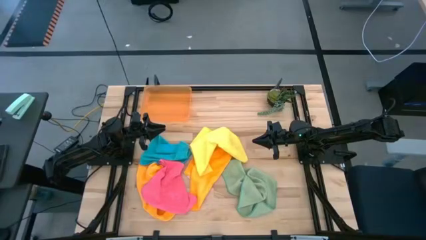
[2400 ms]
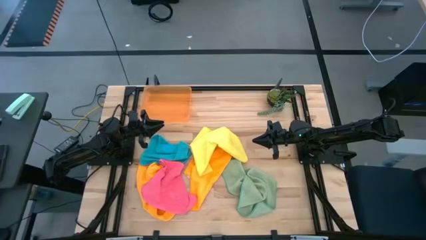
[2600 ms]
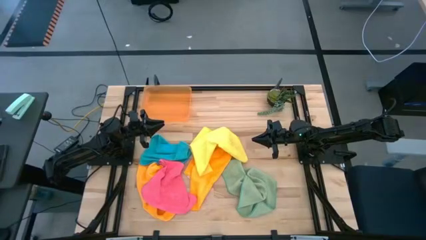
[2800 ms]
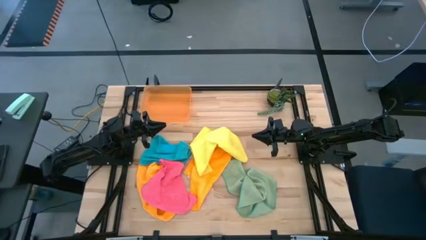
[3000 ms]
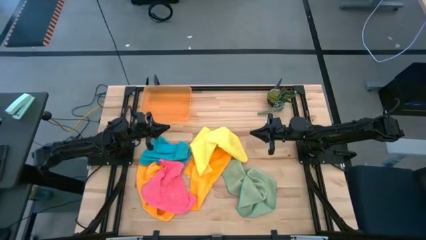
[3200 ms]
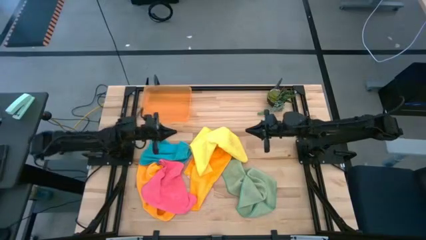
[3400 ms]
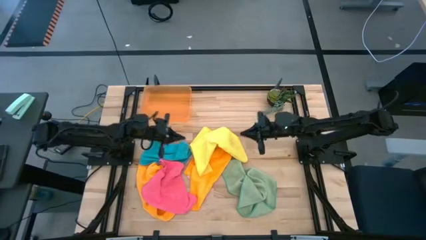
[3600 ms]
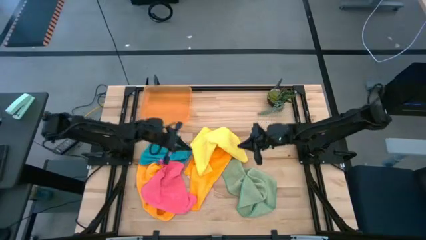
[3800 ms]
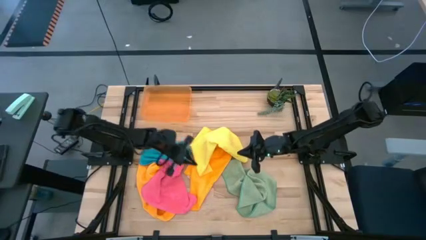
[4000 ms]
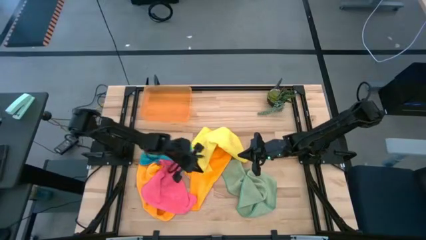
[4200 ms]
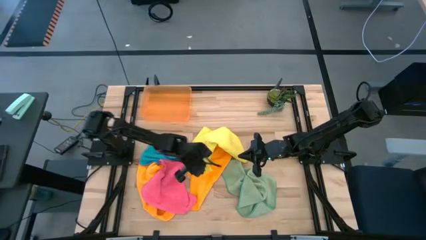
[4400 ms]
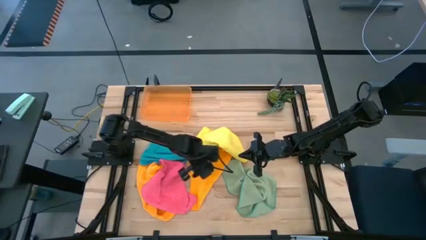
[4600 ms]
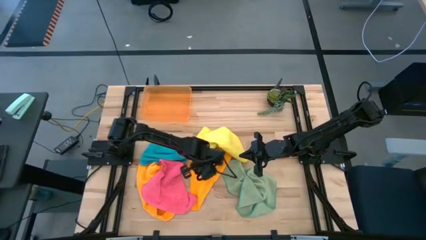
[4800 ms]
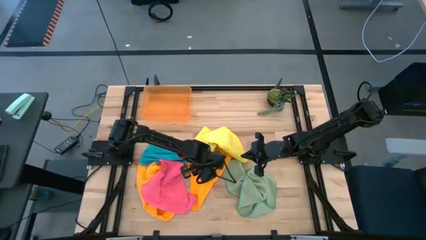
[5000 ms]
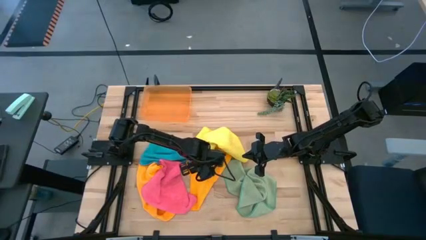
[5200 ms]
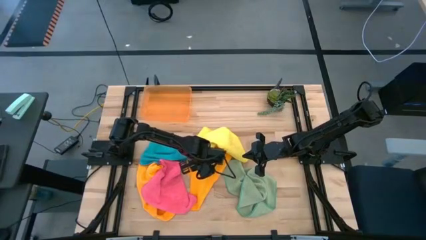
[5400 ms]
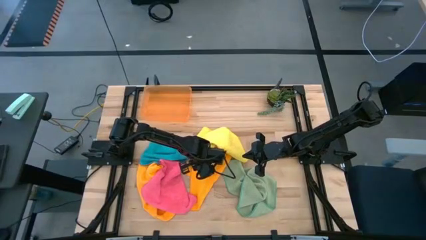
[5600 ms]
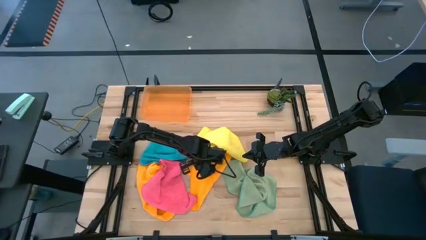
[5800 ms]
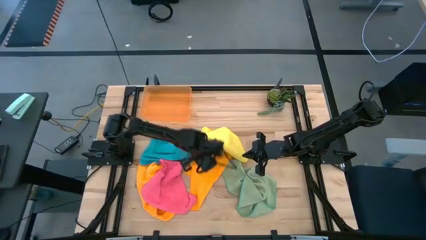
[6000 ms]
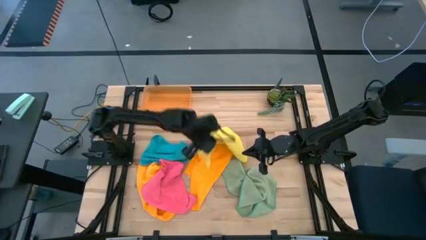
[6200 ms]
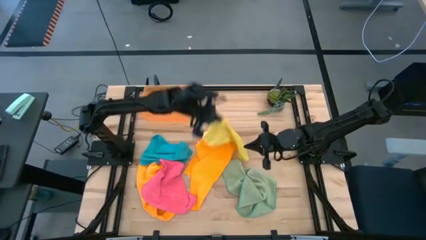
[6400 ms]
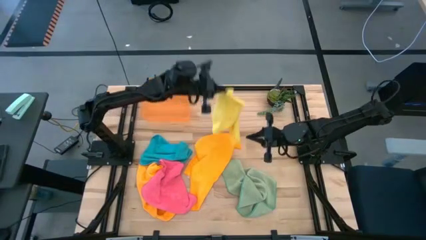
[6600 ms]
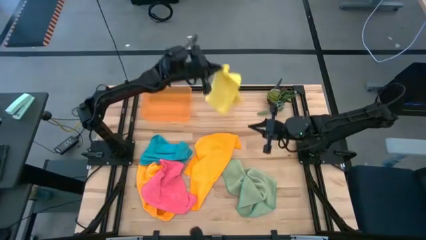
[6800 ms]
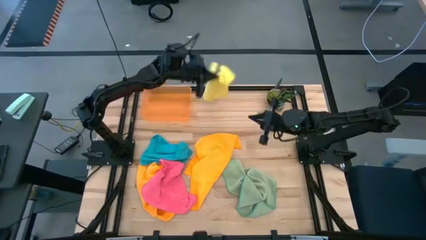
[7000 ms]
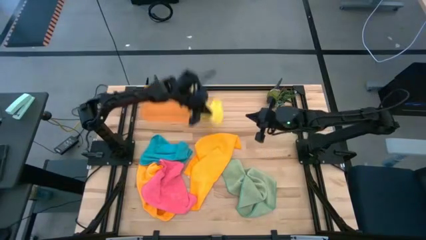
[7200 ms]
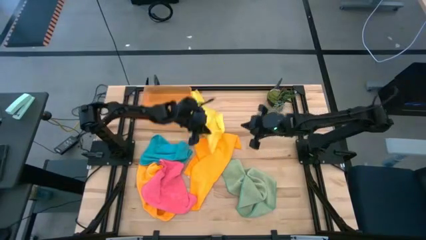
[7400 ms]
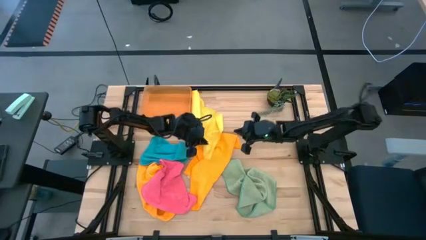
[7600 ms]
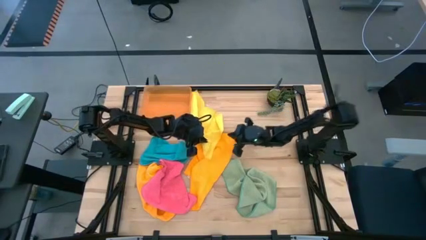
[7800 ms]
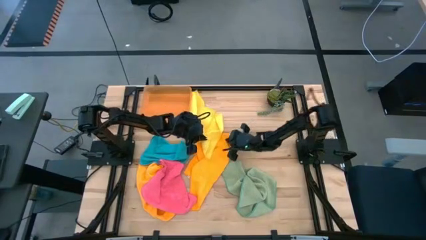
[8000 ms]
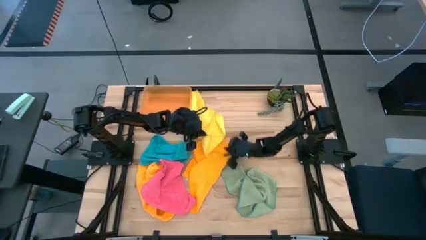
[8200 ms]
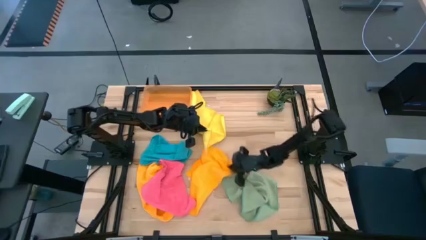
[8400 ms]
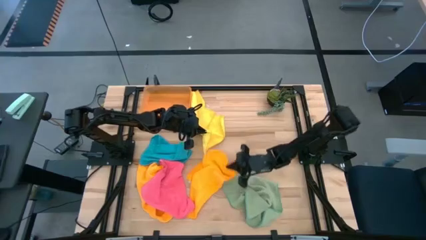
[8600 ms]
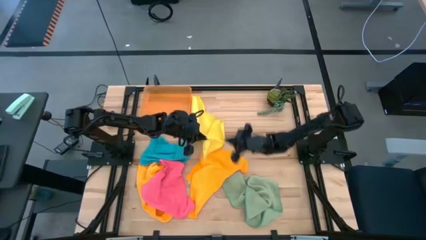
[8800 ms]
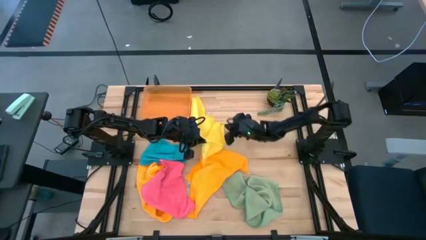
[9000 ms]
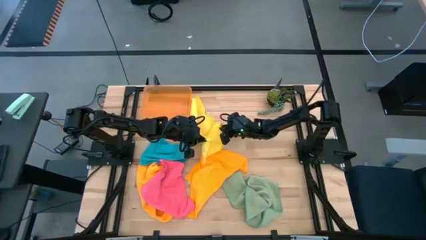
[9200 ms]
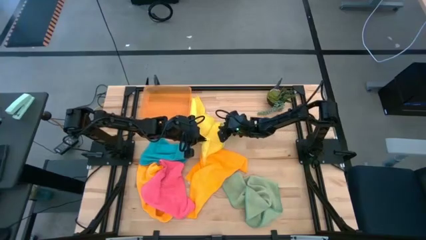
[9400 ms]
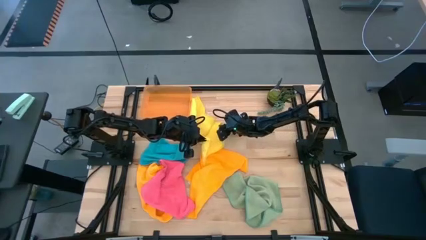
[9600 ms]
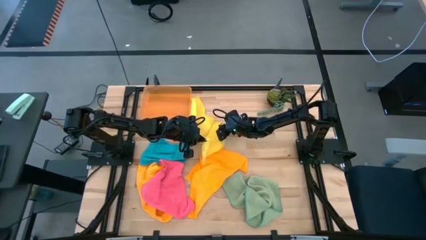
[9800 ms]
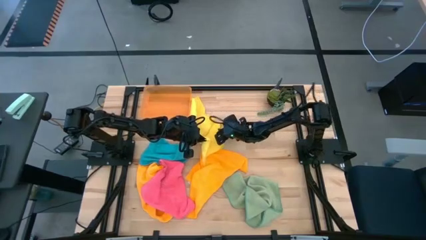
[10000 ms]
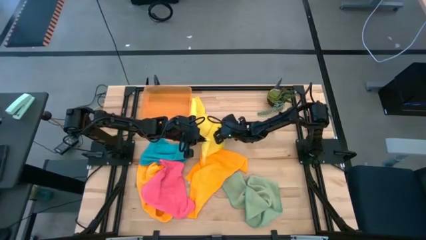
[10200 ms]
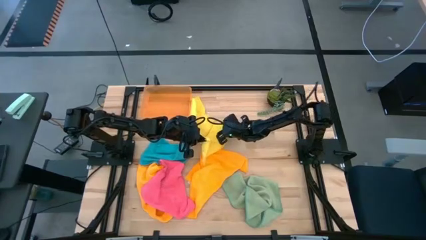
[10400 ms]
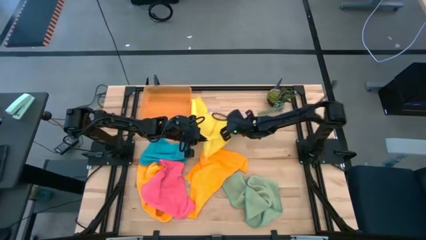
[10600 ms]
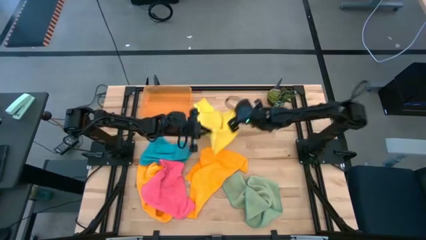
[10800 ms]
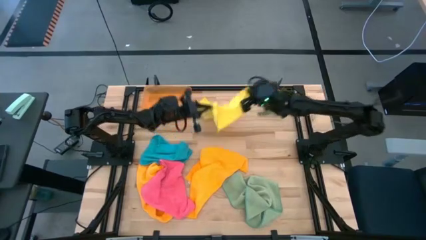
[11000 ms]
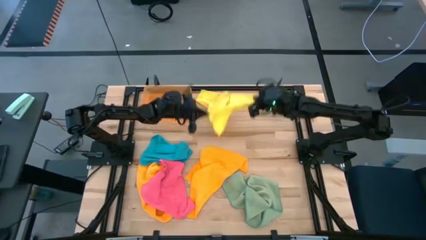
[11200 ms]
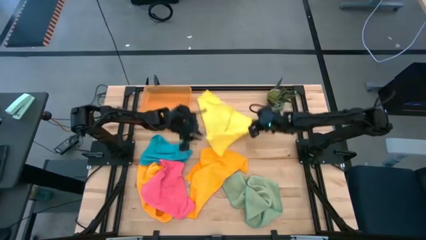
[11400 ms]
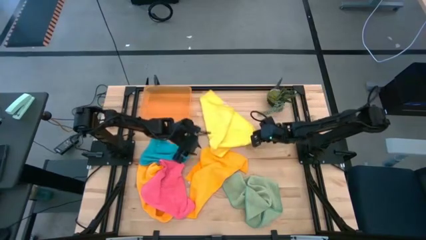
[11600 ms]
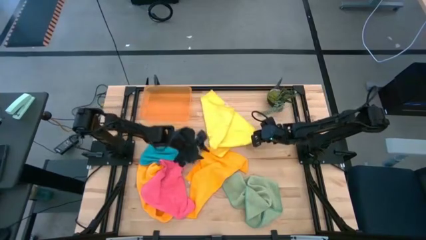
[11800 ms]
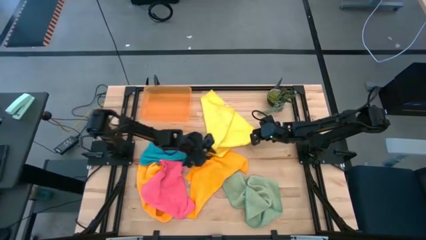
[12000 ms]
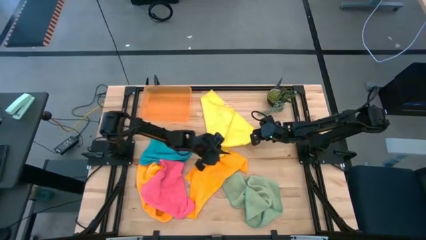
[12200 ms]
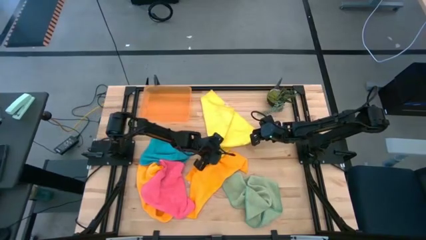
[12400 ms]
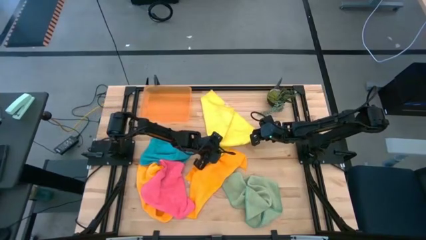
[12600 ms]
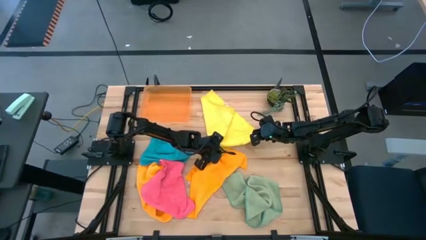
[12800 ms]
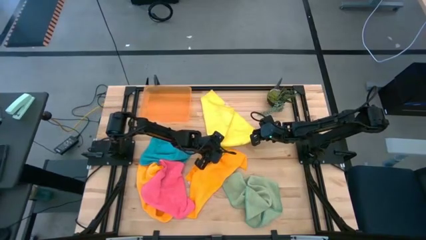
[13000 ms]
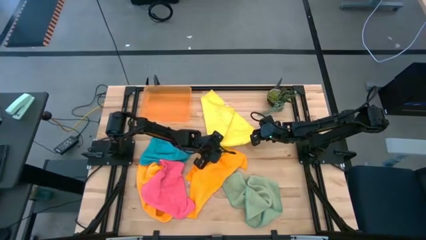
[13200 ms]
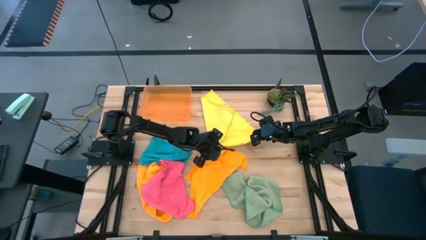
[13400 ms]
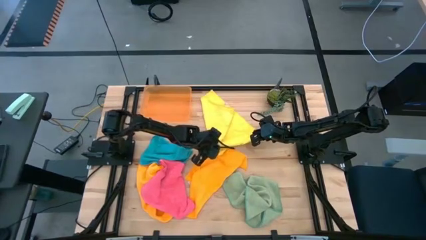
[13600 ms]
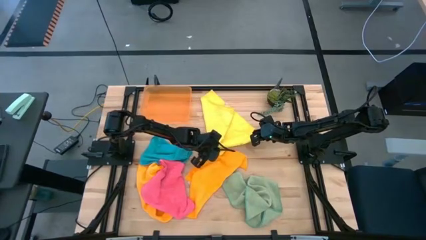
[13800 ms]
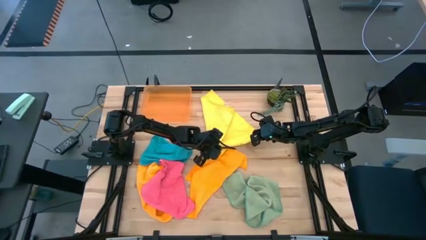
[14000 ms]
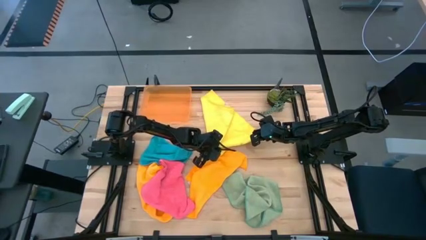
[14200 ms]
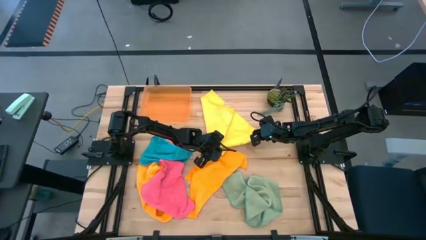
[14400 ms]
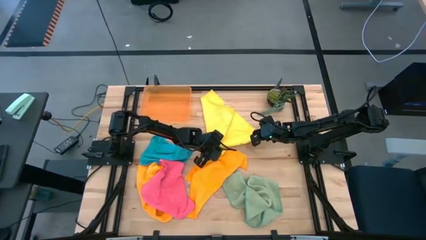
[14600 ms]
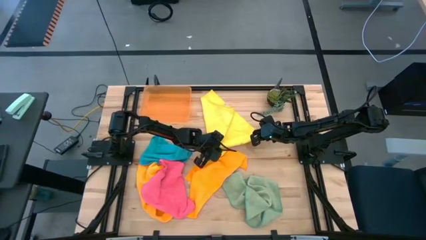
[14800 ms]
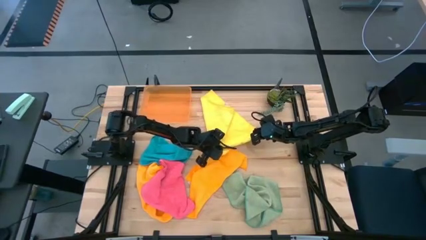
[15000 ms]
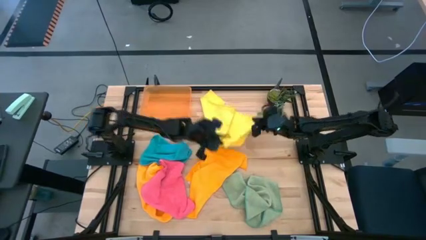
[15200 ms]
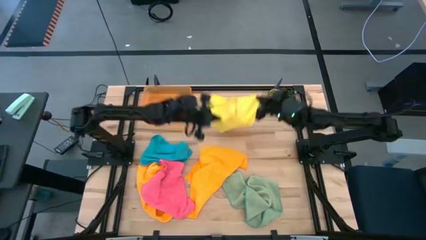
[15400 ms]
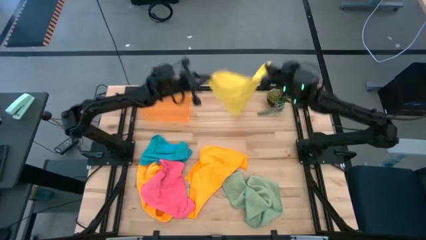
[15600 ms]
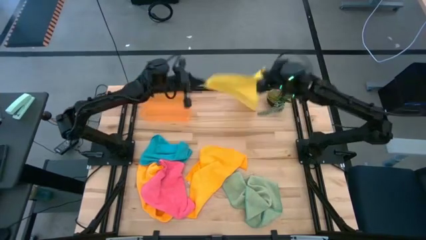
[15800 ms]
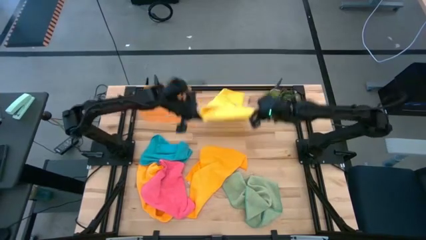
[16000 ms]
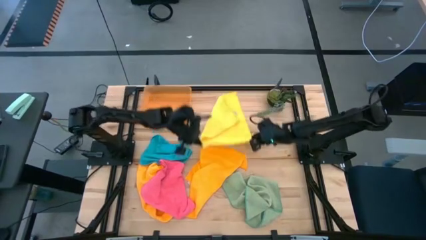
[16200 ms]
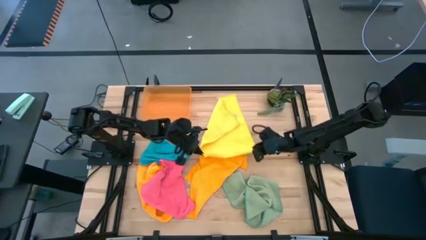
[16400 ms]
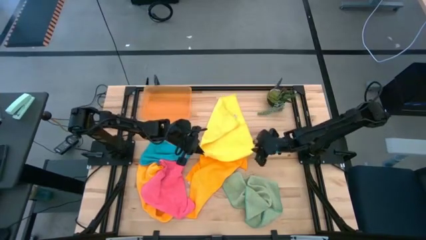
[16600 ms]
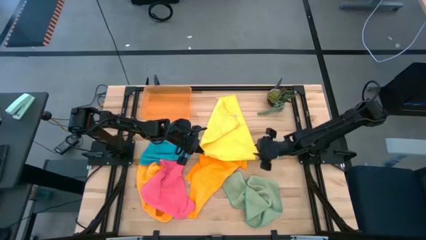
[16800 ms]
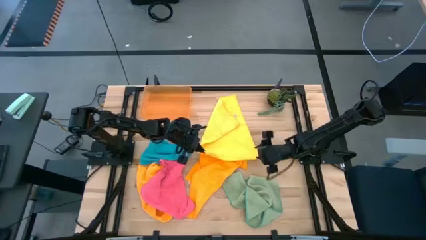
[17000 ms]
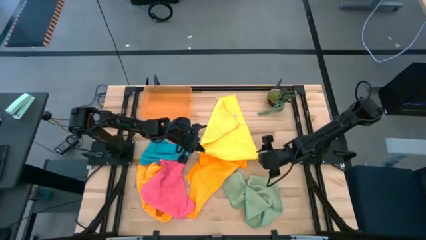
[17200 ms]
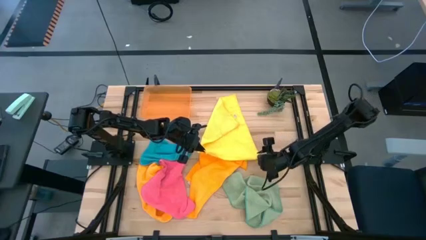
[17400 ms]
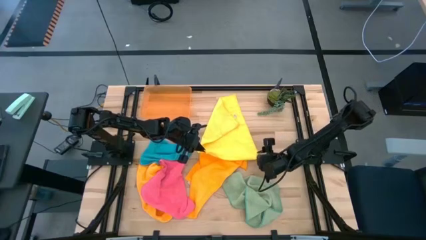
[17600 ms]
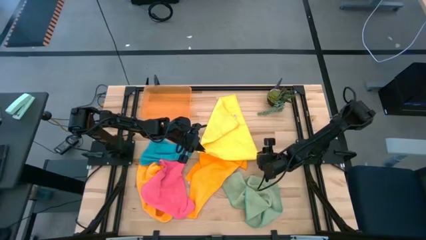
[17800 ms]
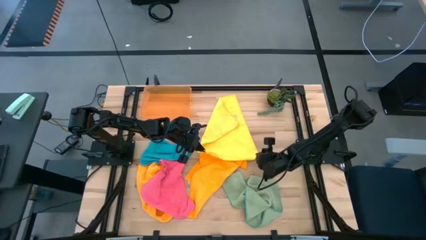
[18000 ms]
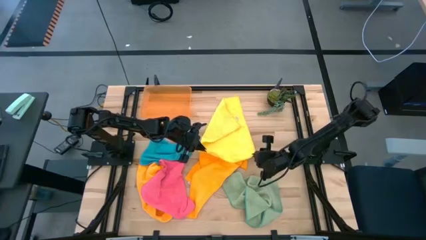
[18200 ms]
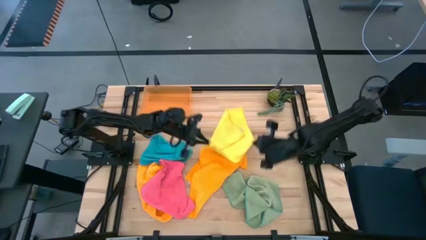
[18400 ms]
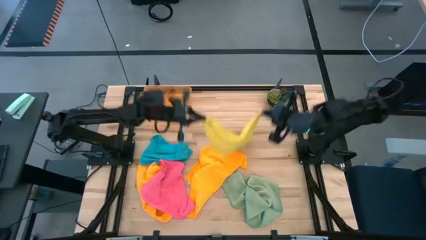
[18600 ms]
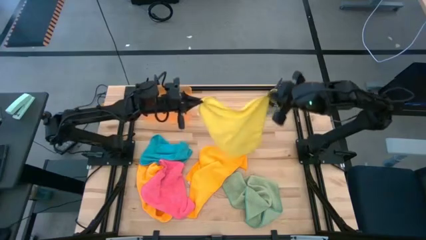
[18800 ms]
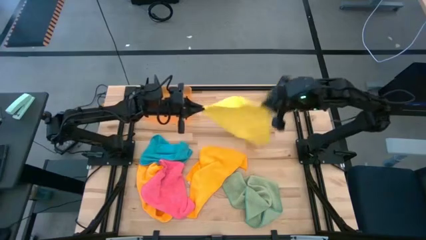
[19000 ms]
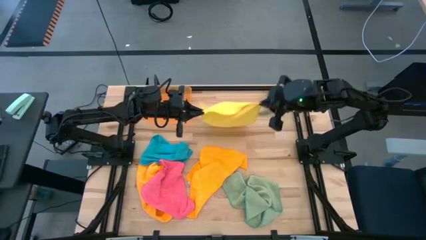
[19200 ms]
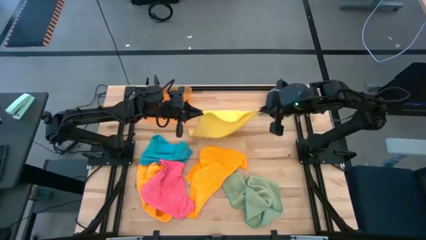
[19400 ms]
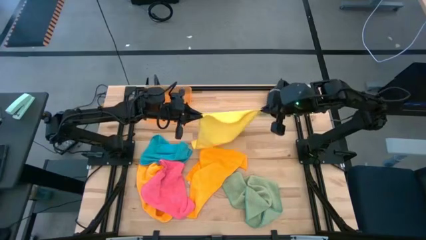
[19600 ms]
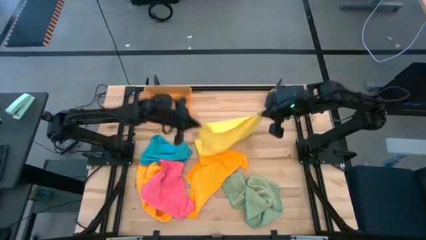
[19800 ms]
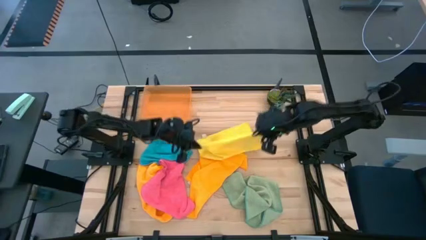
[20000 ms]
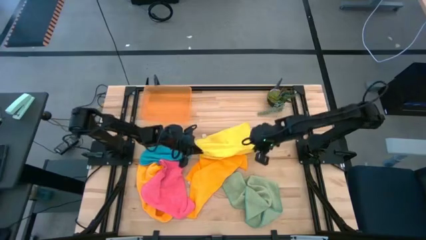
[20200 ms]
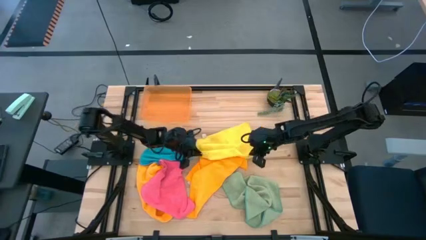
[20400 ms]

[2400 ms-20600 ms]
Task: Fold microfiber towels
Fold the yellow towel
